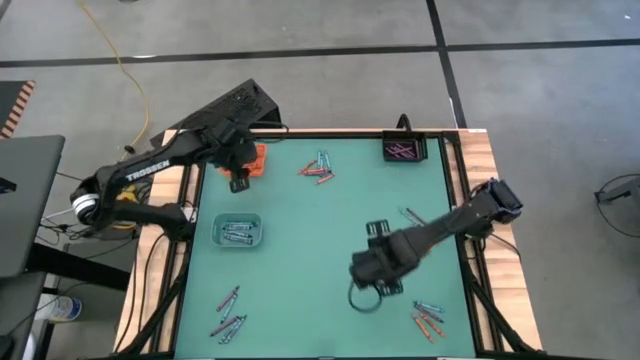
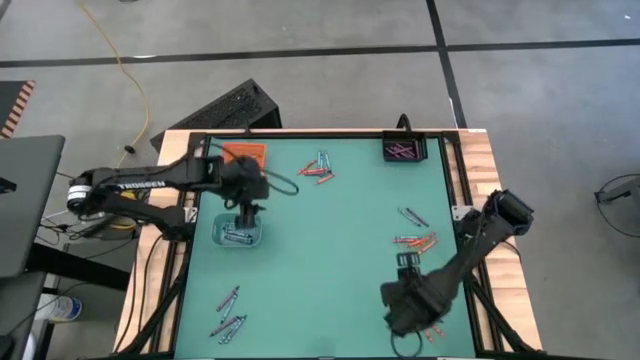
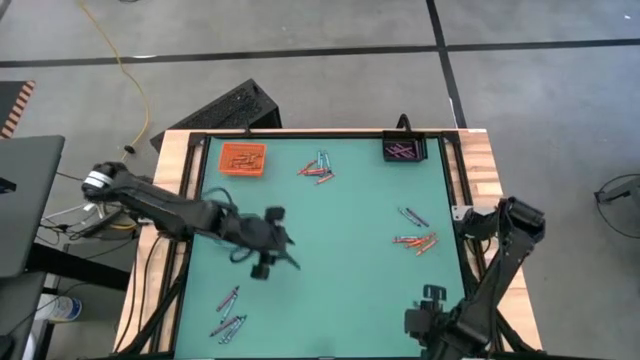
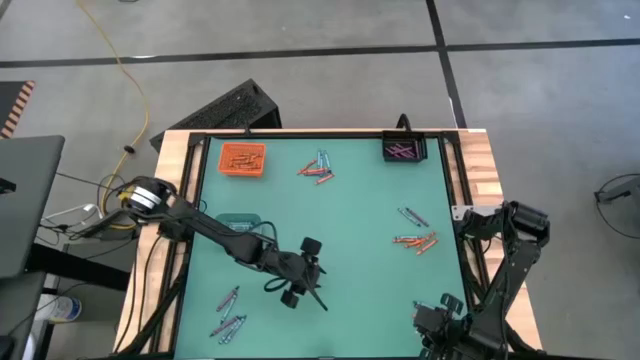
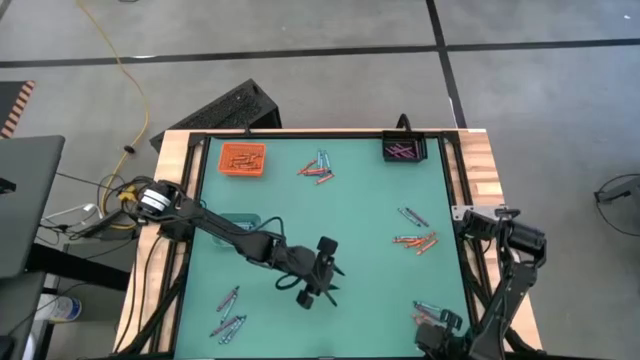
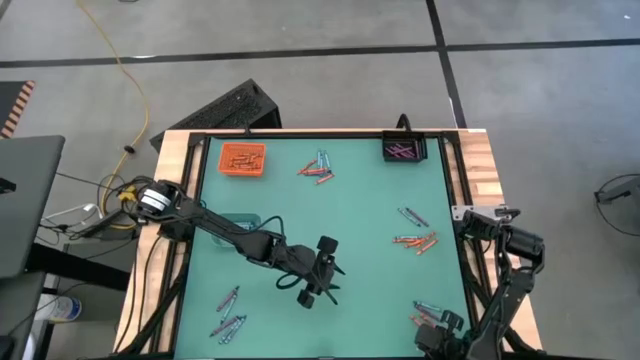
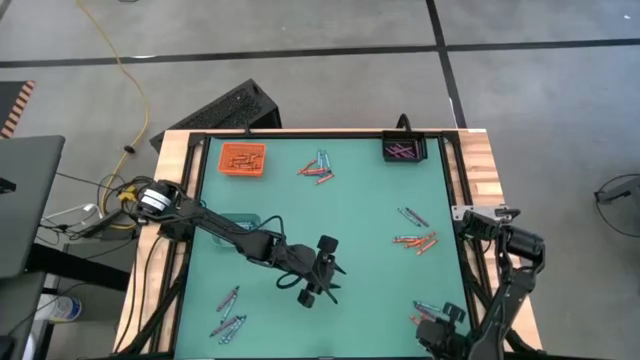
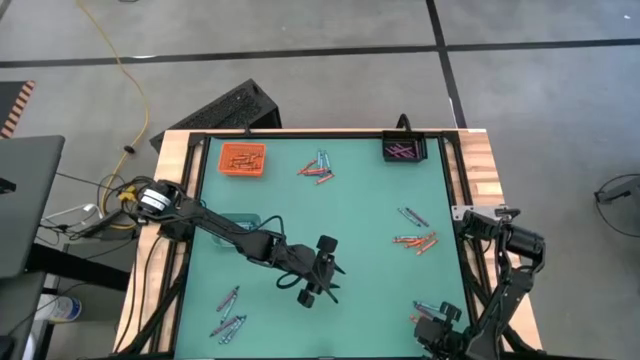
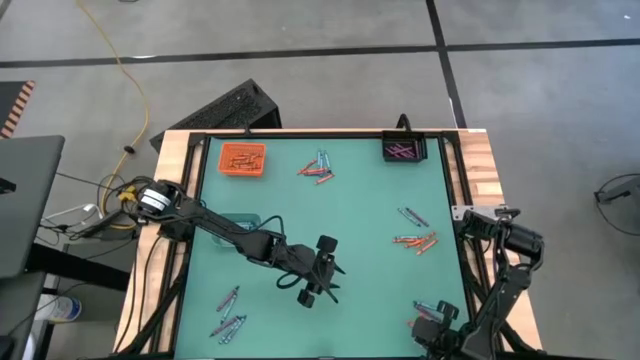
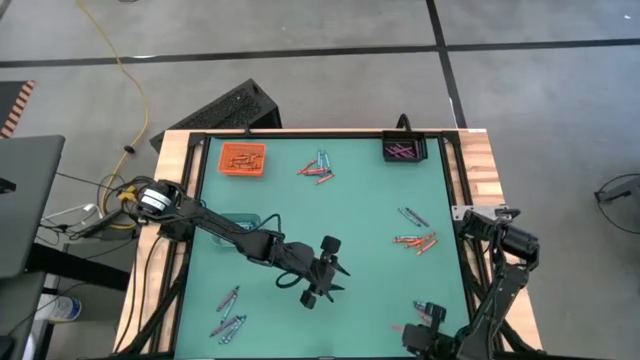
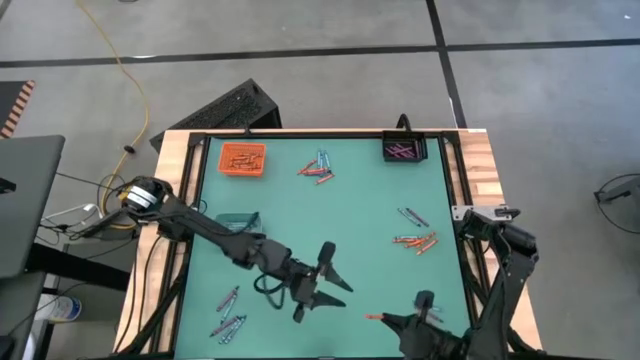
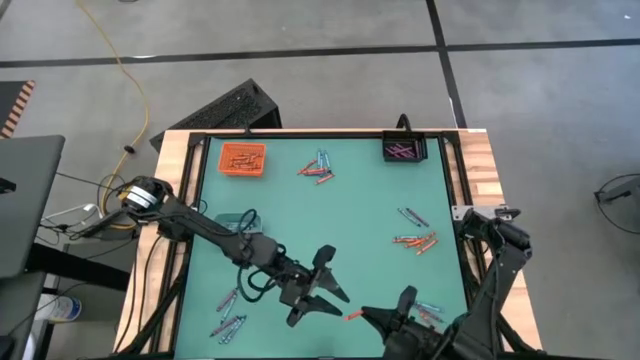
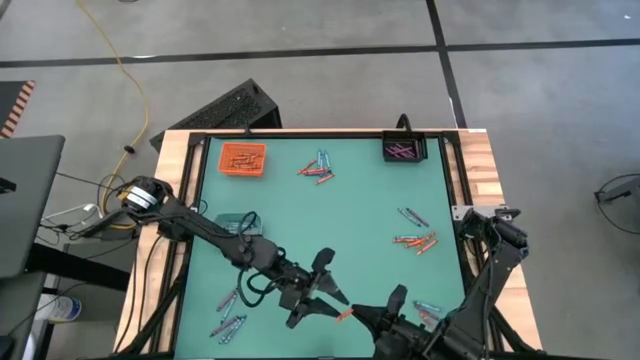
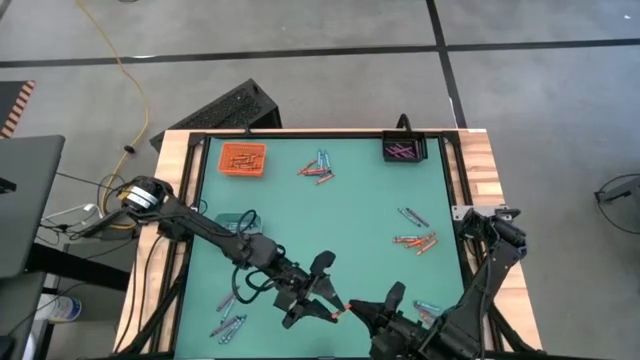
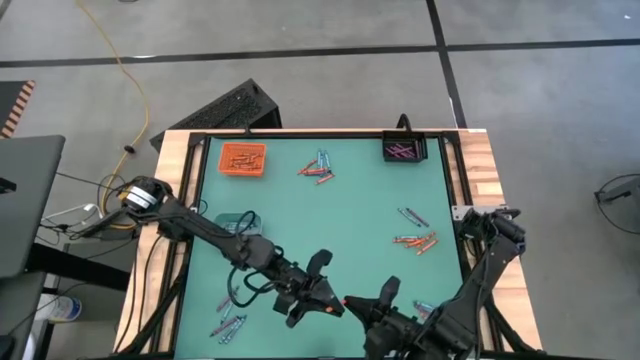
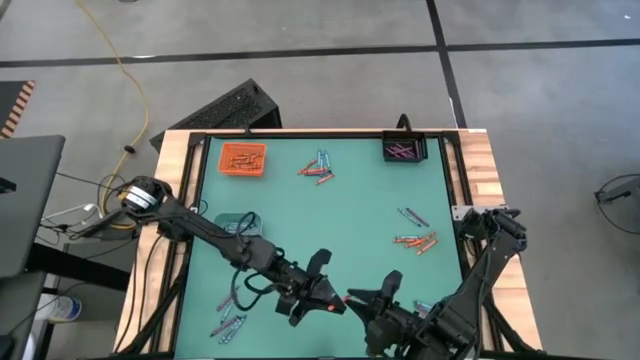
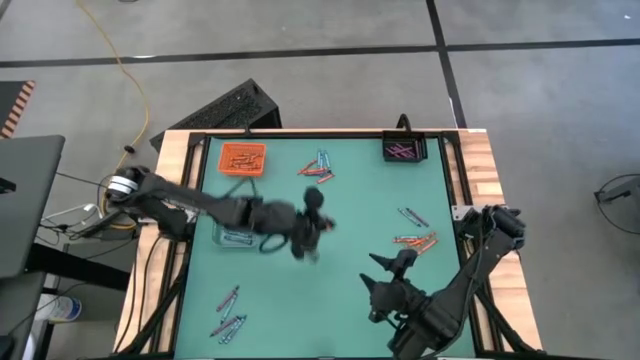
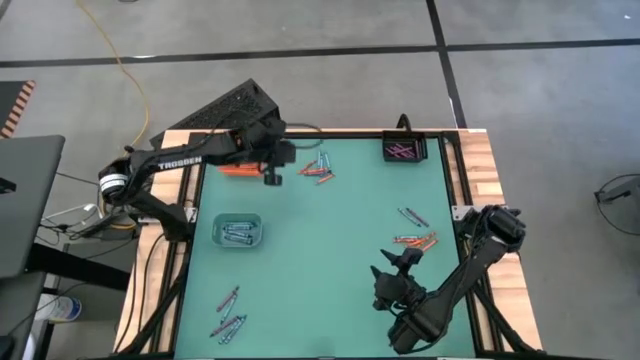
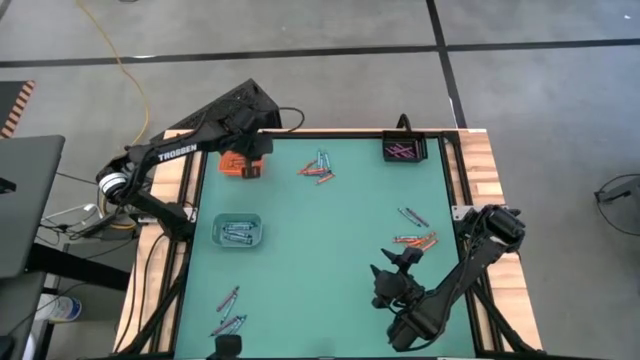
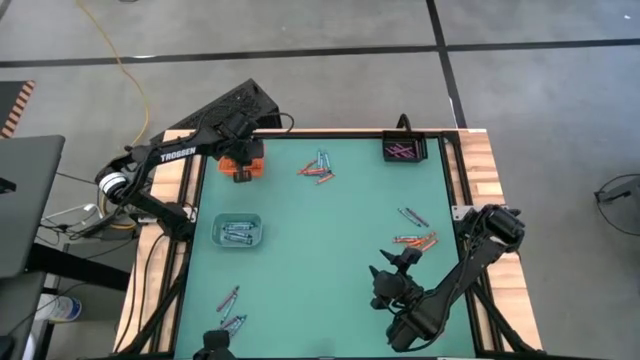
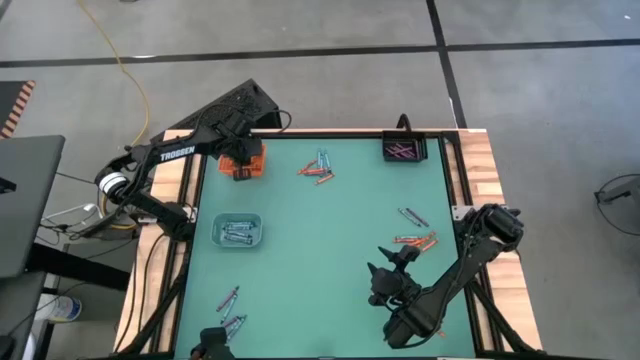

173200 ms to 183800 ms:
Task: Sort crayons
Put the orange crayon into the orange basket

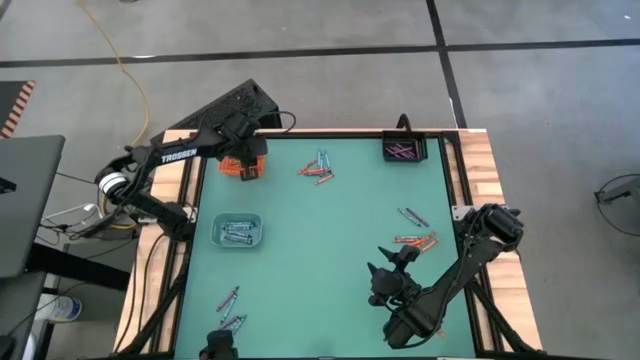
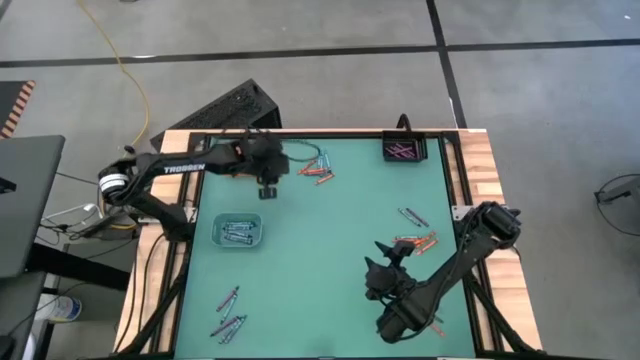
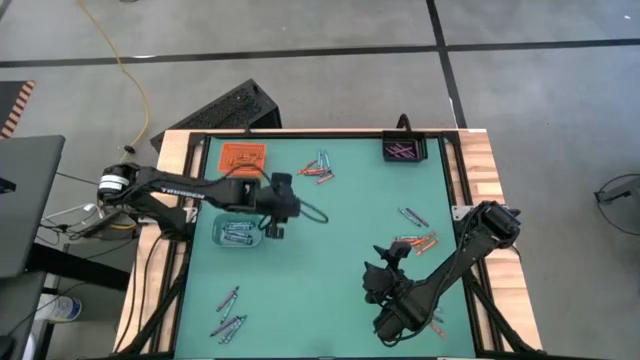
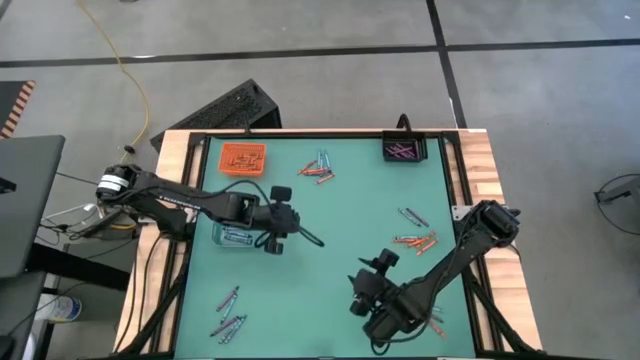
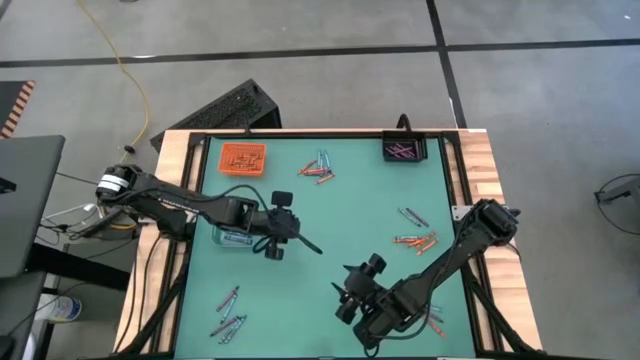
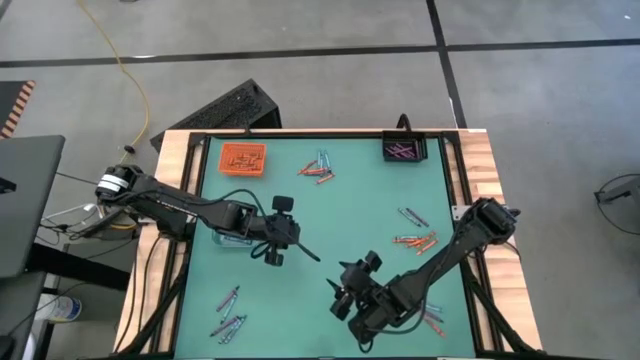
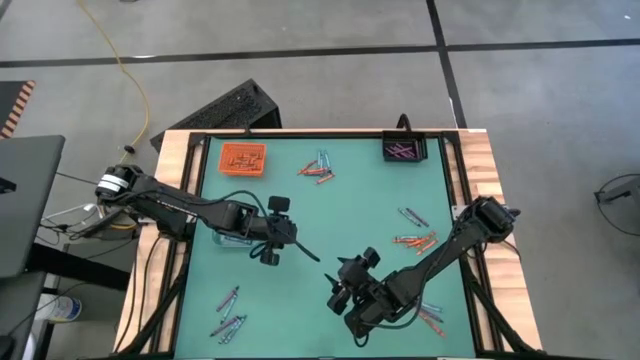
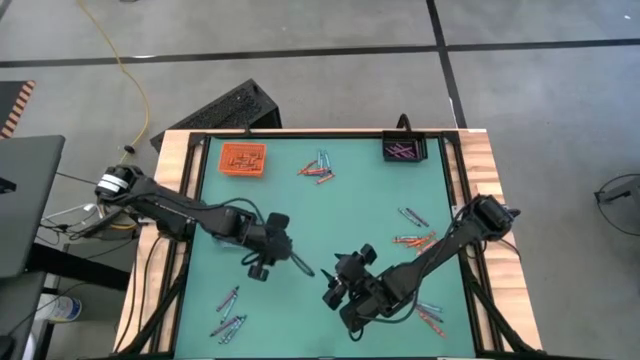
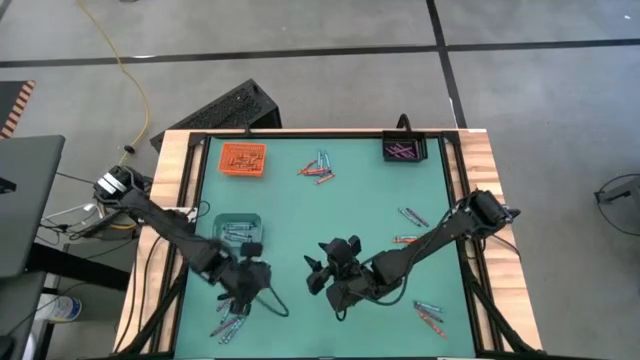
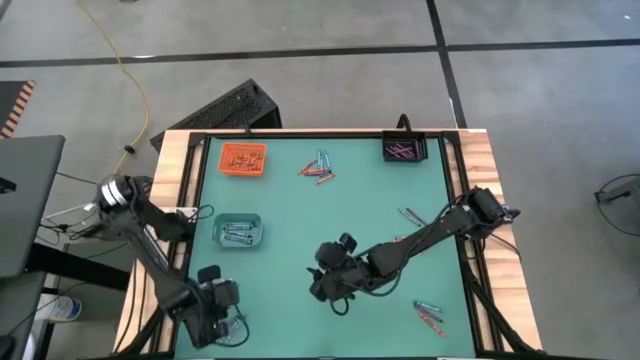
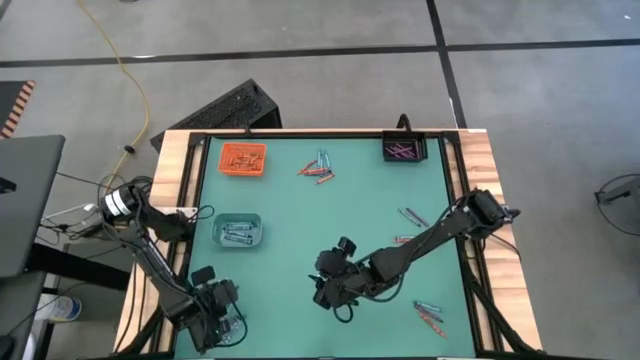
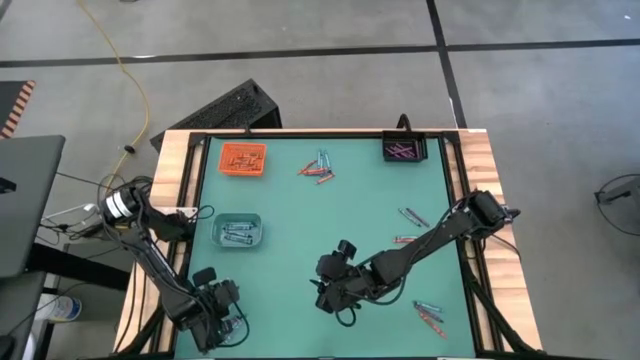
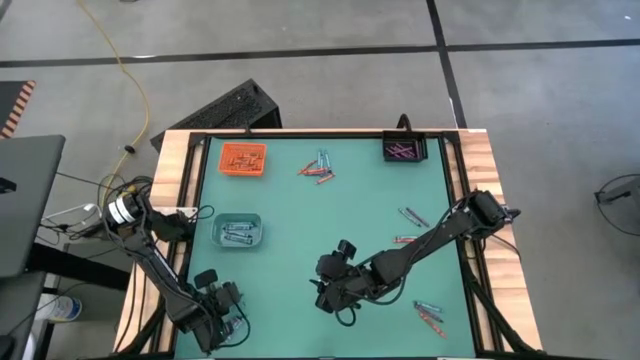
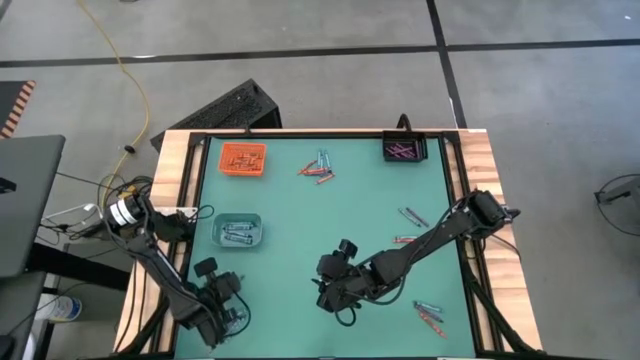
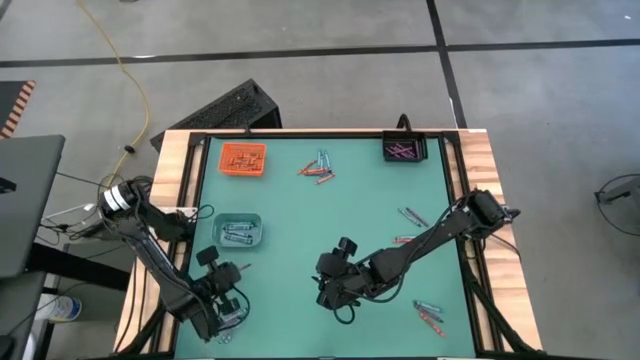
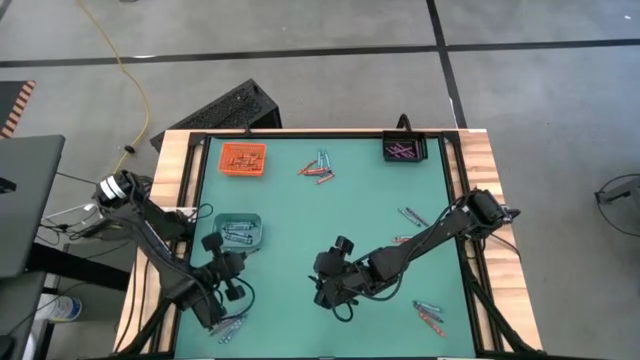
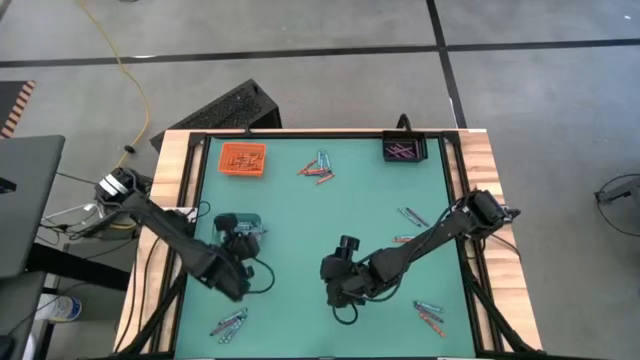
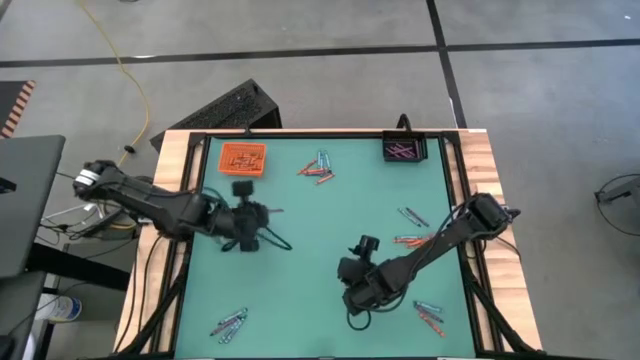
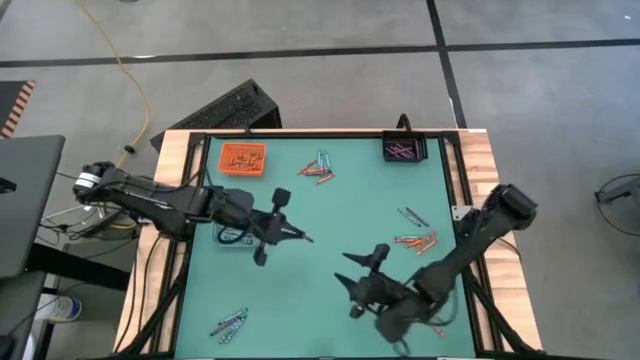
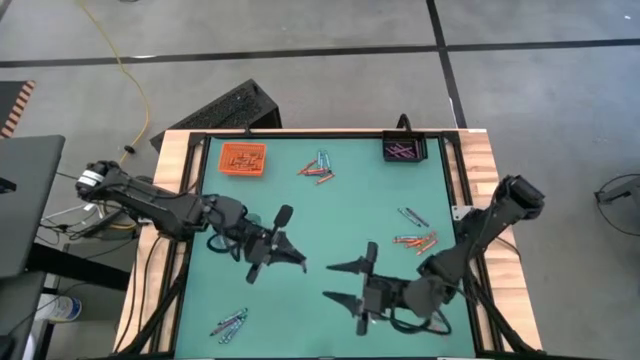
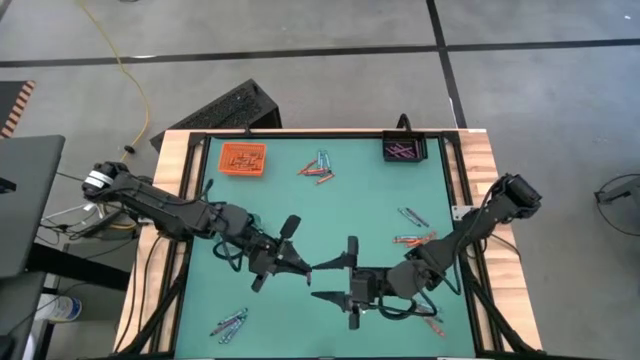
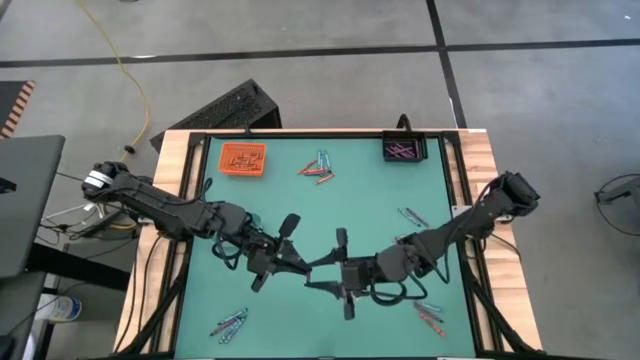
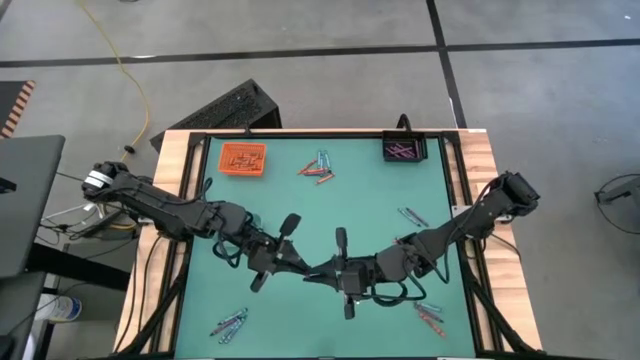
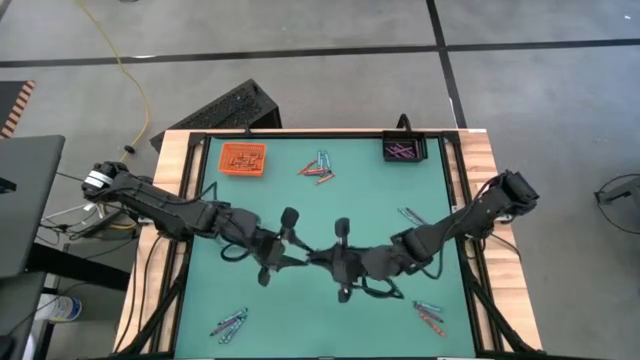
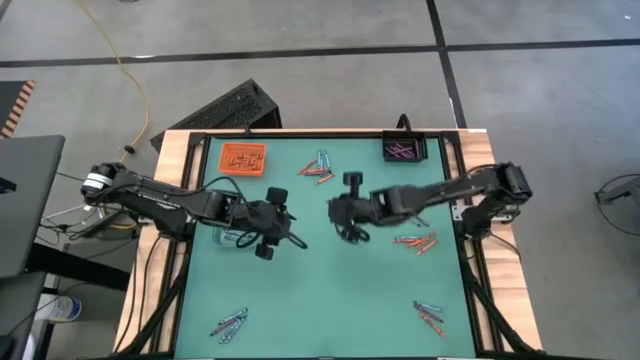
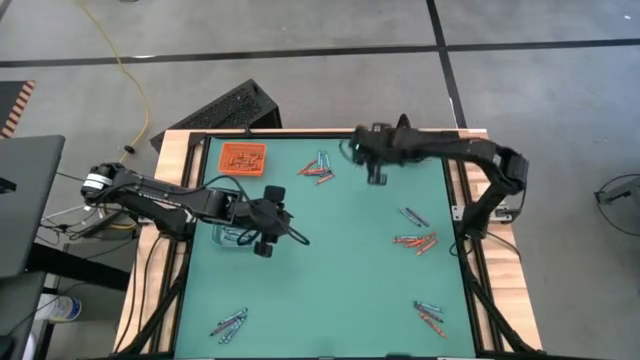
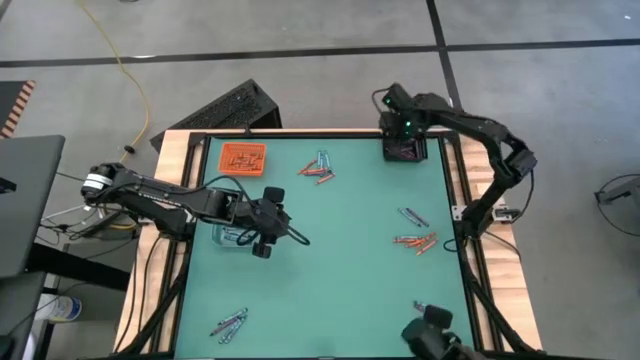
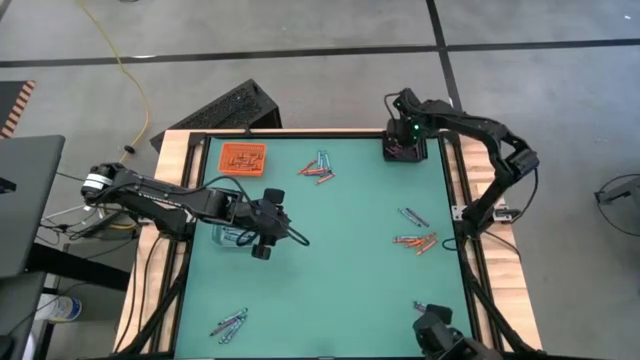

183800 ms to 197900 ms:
Put the bottom left purple crayon into the top right black bin
